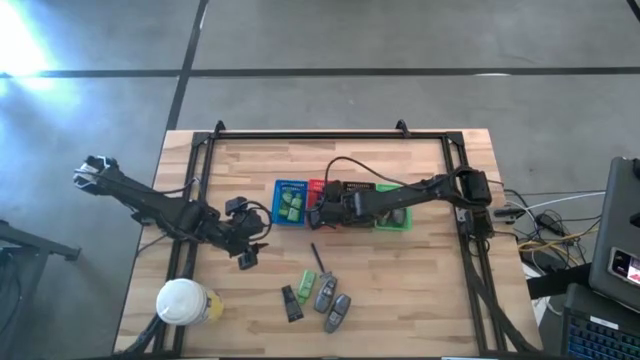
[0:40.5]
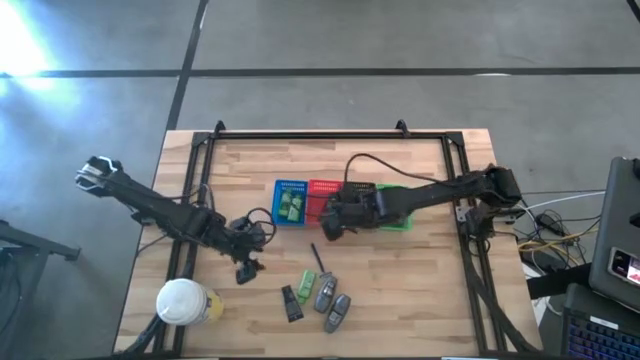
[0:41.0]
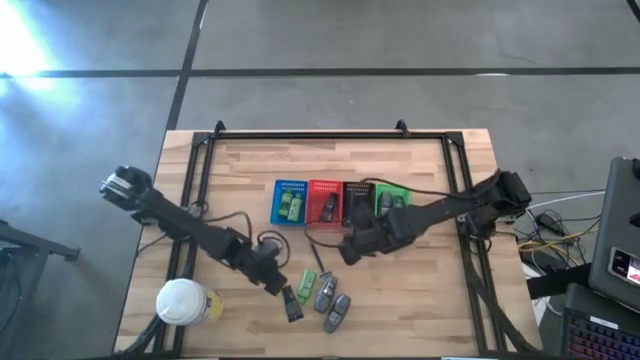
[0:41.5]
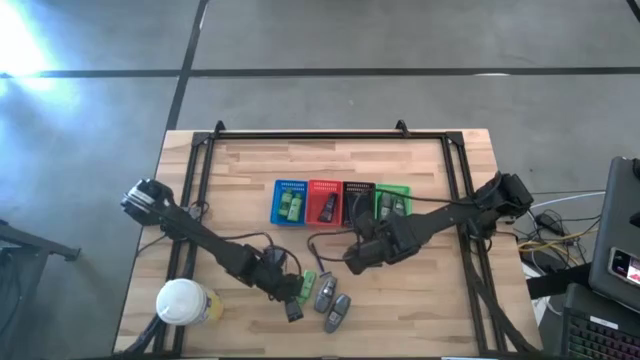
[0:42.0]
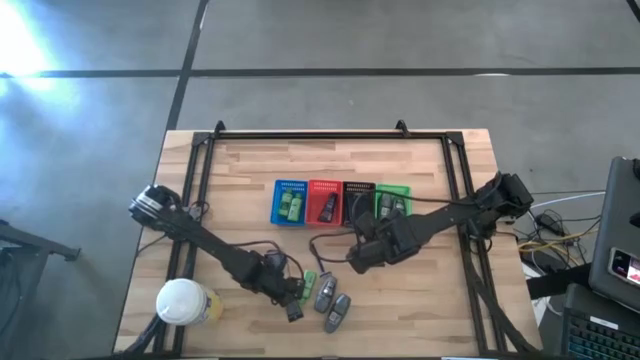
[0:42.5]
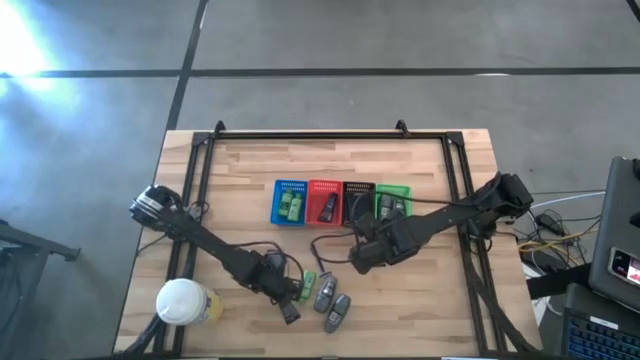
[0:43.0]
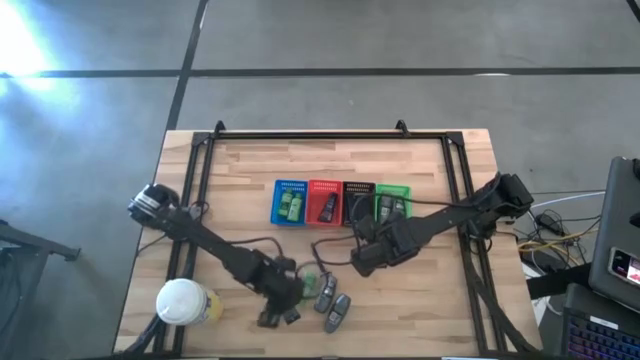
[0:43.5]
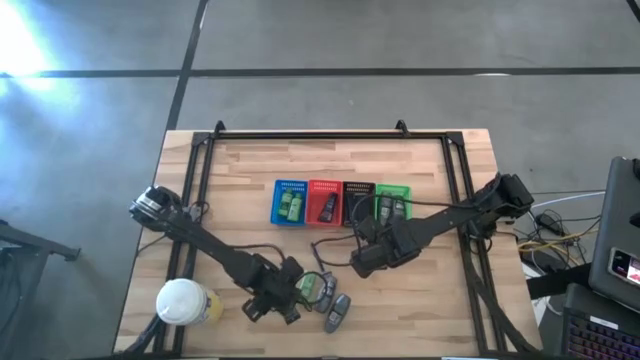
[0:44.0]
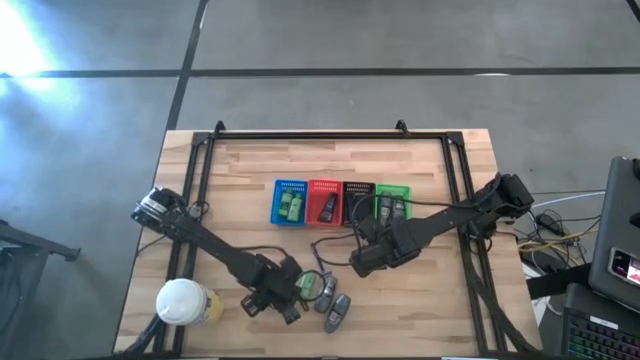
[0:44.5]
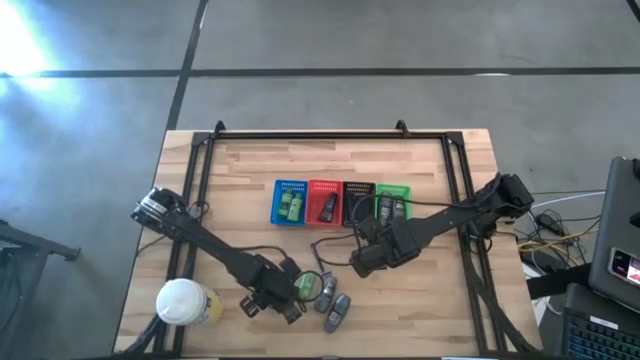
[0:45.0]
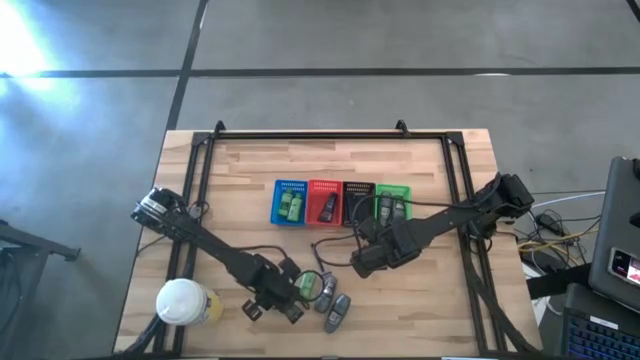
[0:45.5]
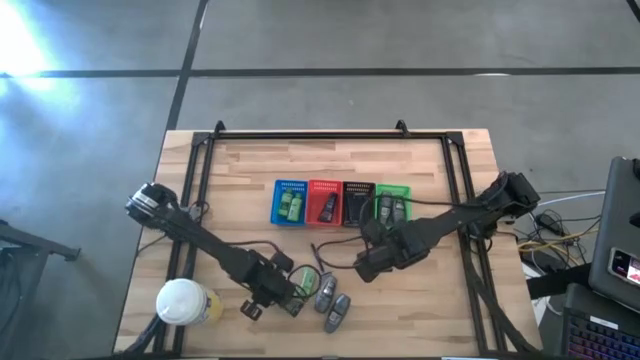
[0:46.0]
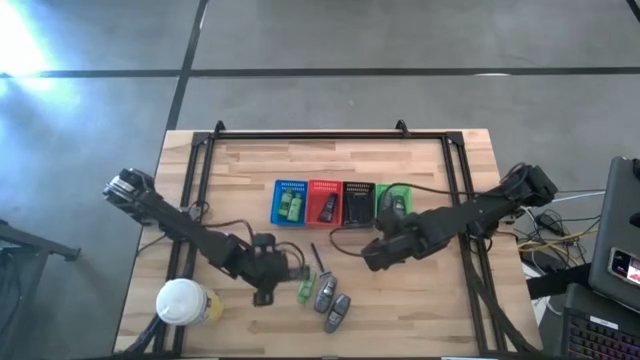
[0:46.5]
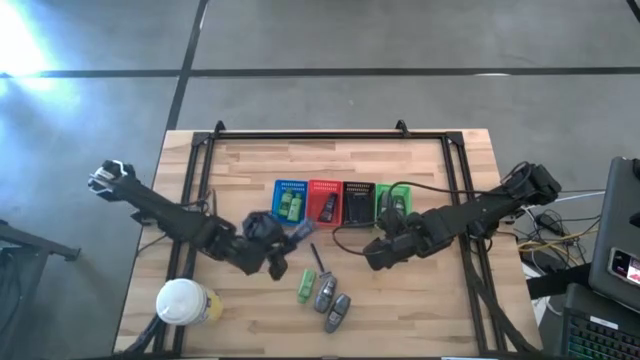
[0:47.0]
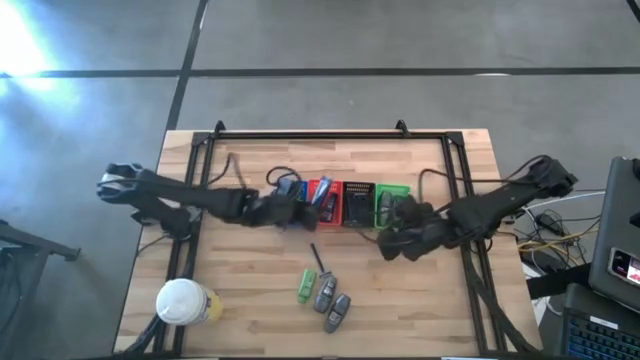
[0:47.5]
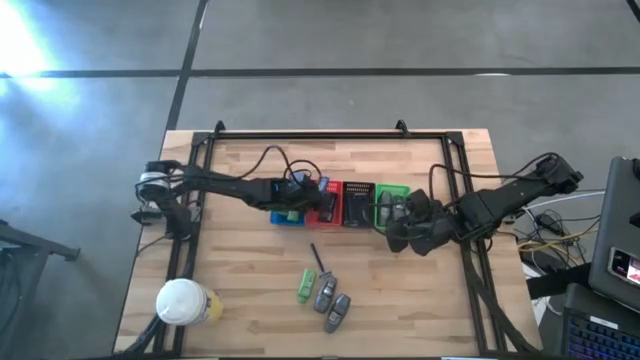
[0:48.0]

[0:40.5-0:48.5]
Task: Pick & Place Travel size toiletries
Put the blue shave cream into the red bin

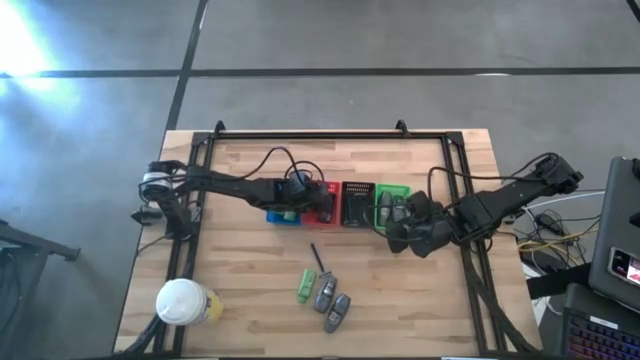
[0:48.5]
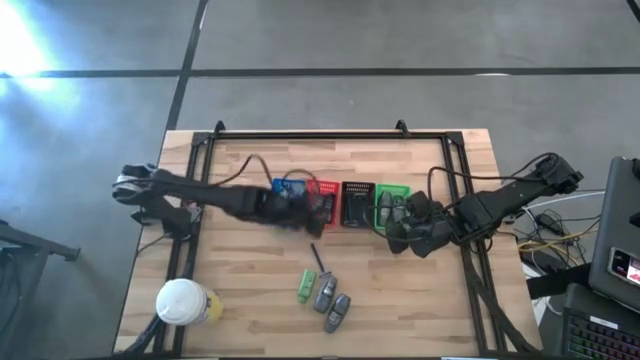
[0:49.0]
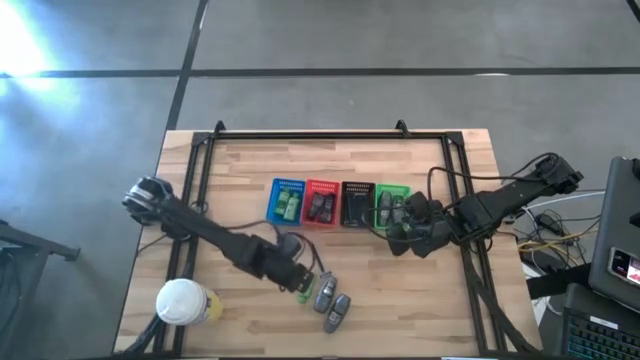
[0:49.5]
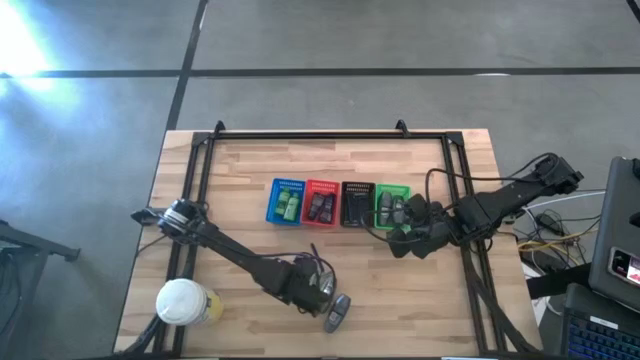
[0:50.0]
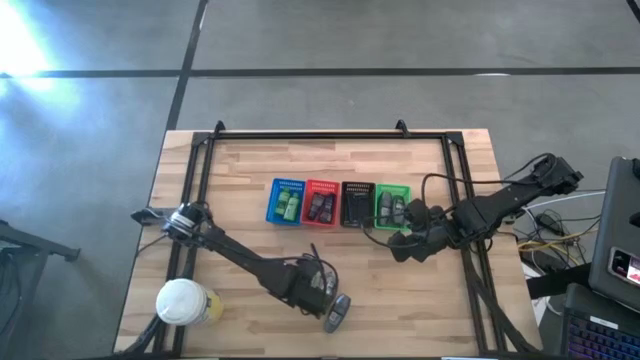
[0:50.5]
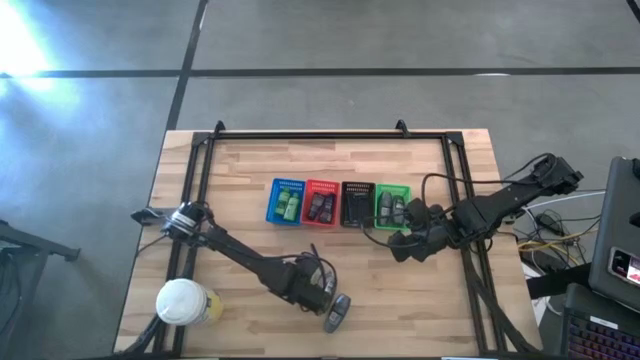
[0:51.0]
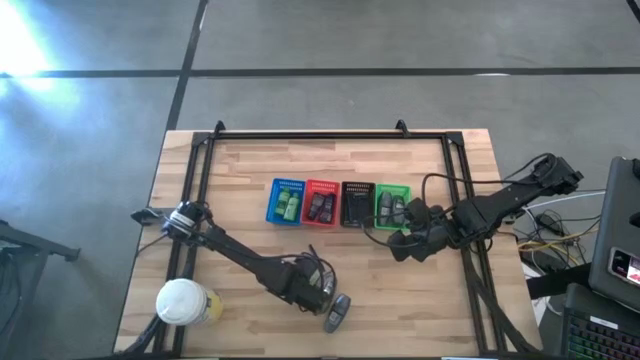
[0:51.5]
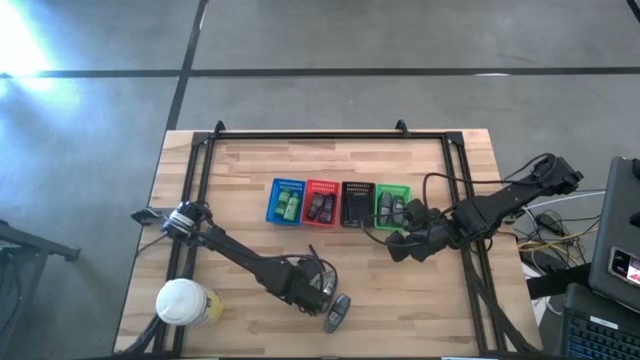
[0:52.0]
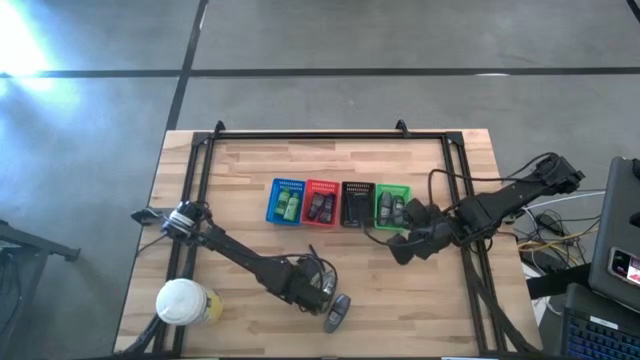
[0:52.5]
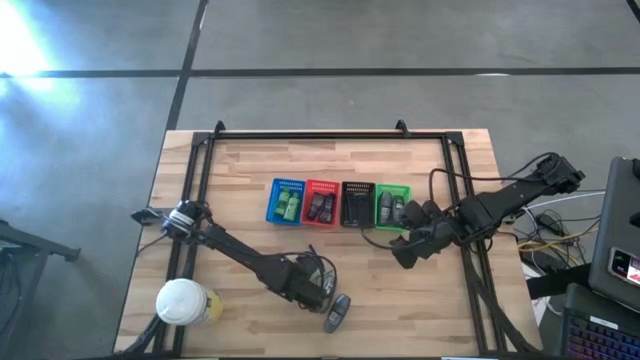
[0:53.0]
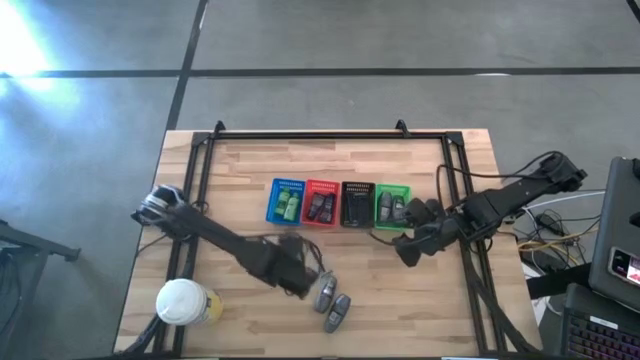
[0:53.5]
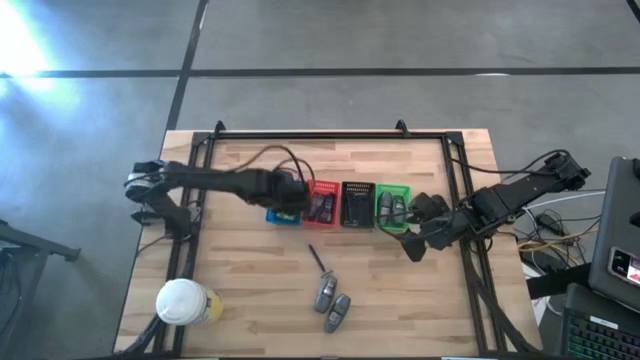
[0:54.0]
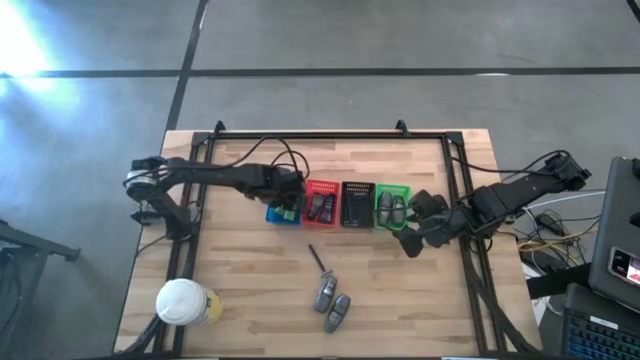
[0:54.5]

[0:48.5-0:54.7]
Put the green shampoo into the blue bin

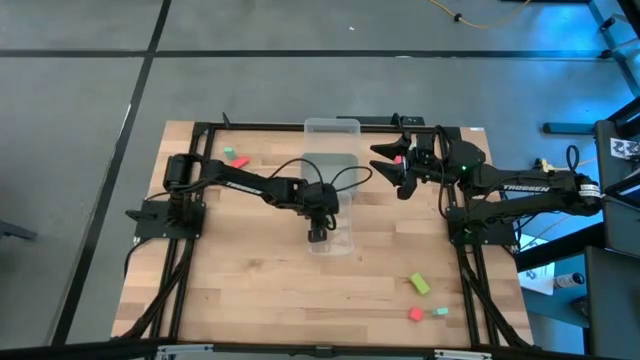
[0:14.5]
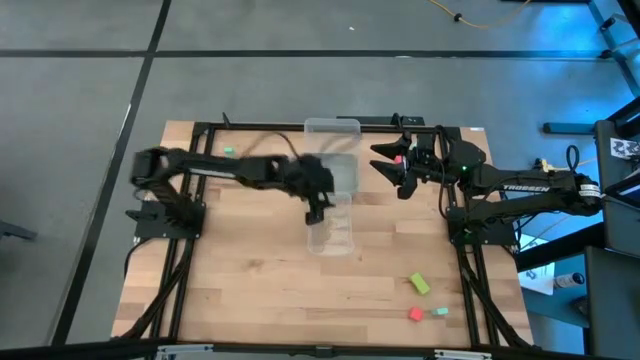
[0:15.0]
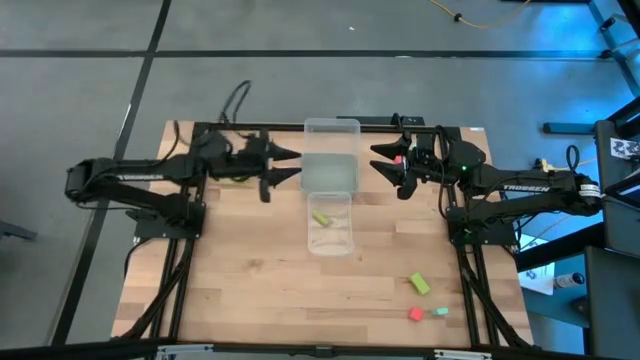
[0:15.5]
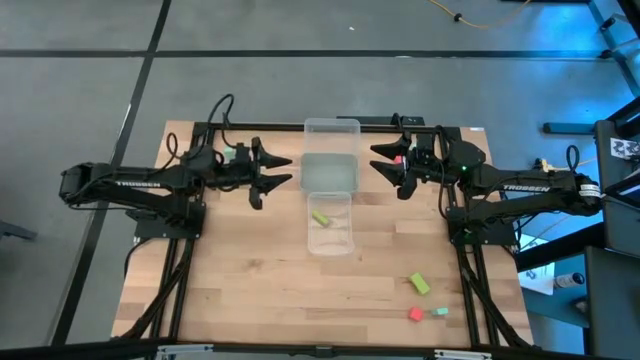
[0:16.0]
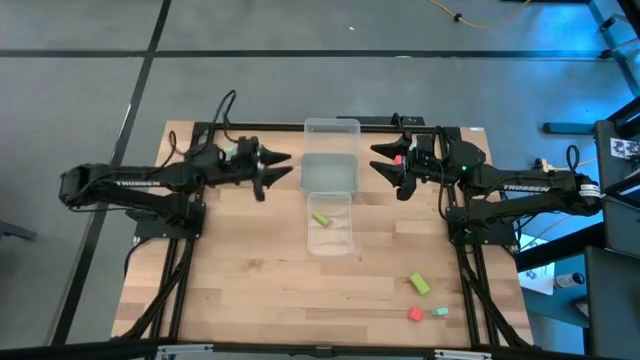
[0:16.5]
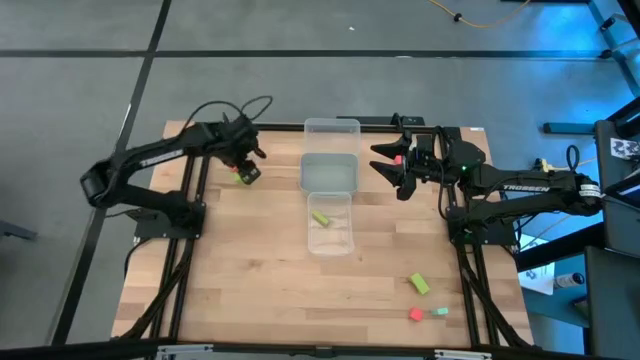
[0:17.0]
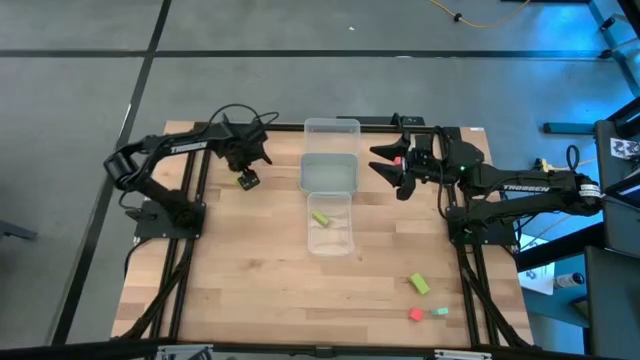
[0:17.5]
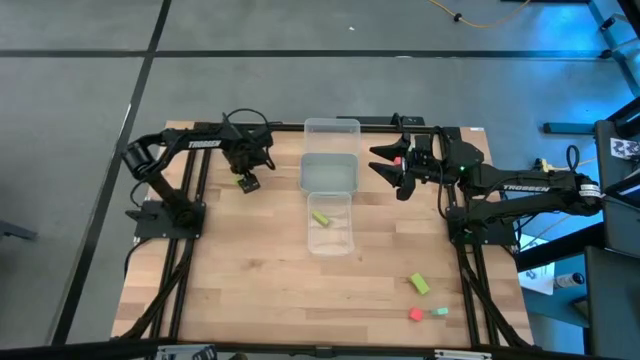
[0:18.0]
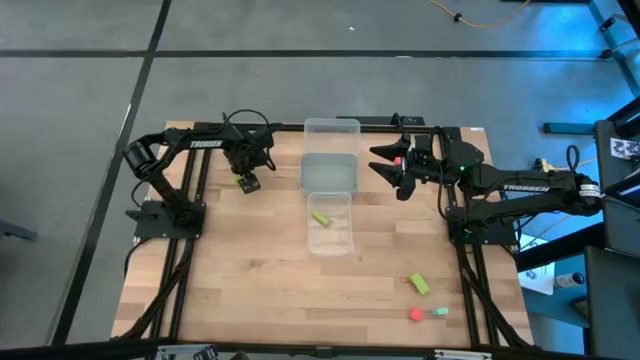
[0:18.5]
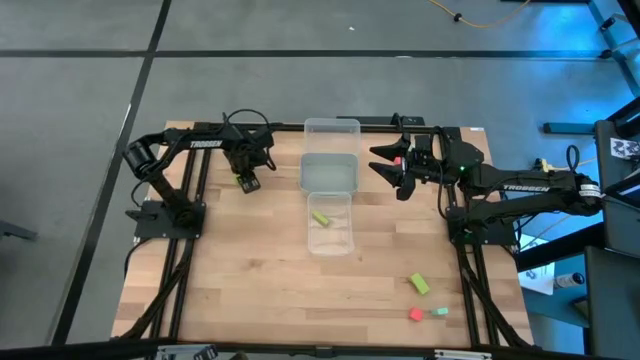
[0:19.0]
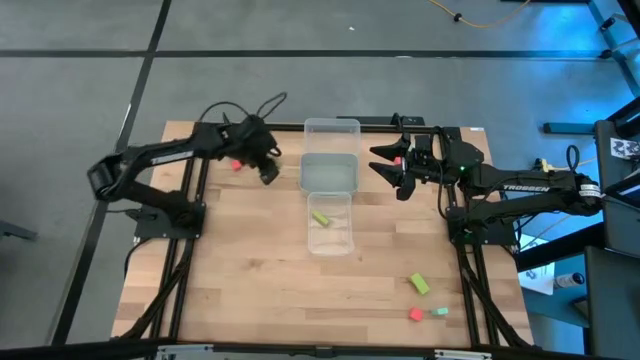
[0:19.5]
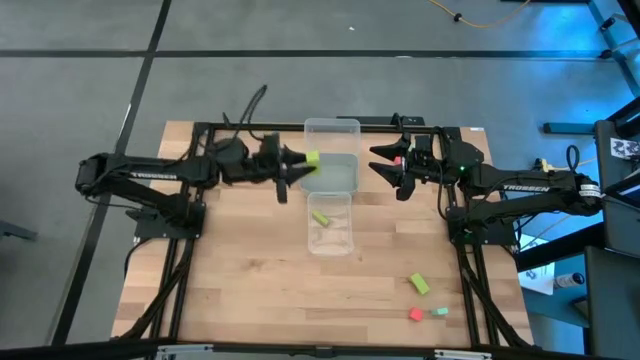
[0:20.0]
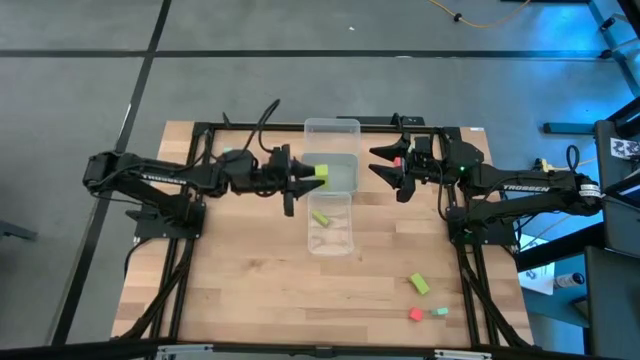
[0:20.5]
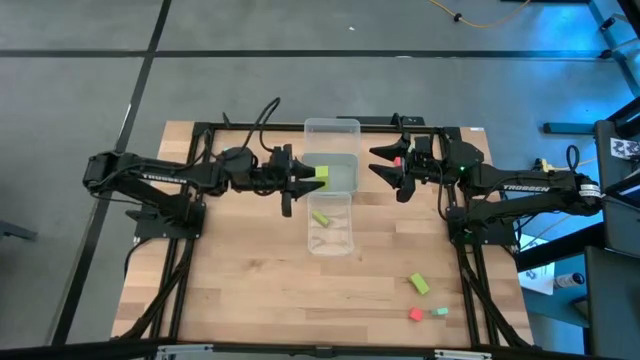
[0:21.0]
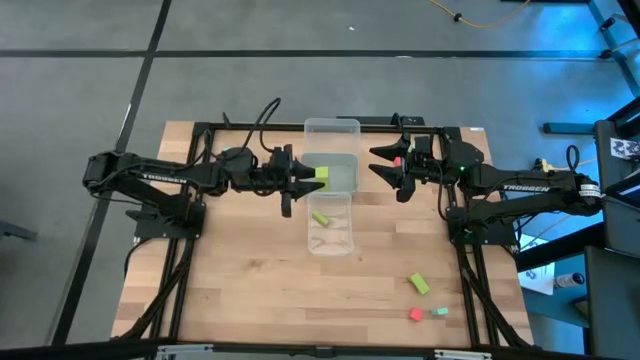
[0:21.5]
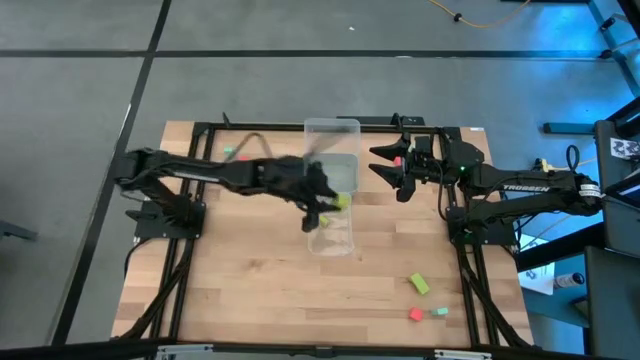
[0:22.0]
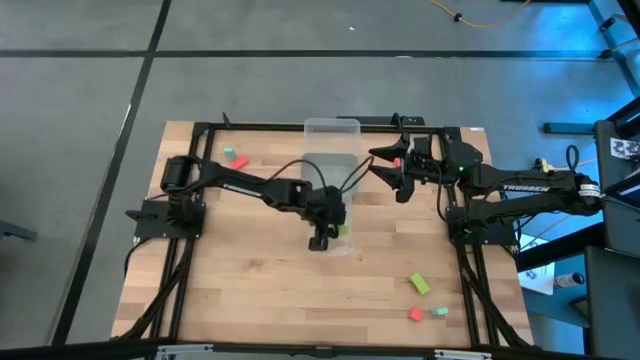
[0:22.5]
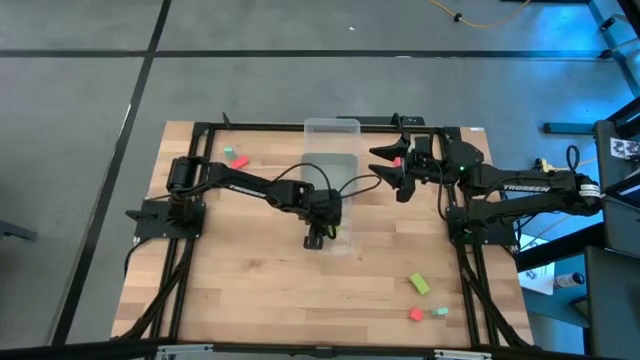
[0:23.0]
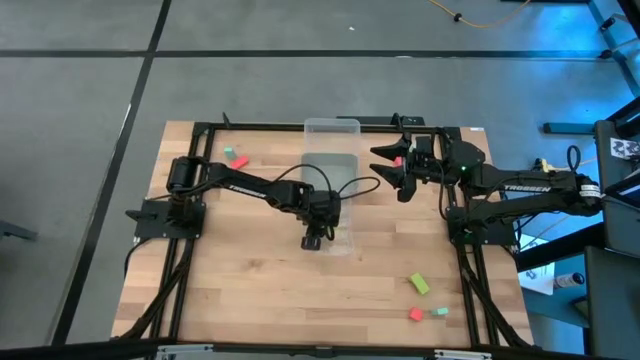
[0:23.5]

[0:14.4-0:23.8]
Task: Sort & place blocks by color
Put the top green block into the bottom transparent bin
